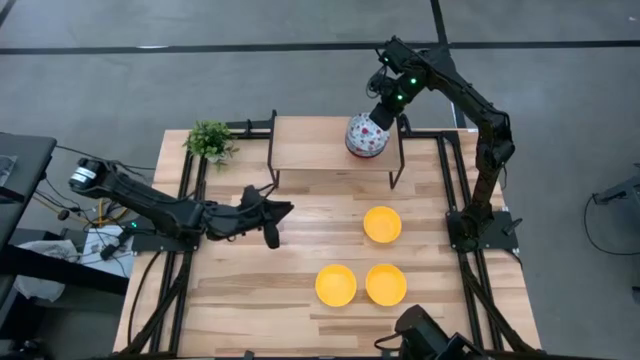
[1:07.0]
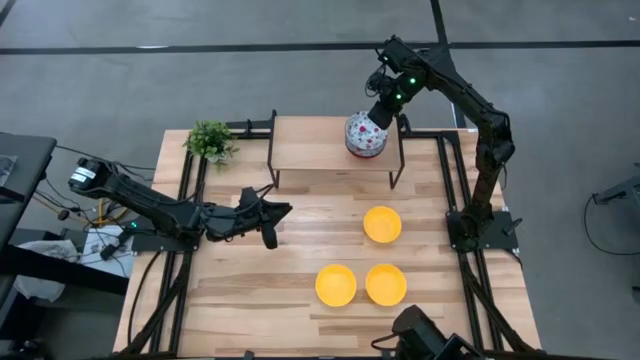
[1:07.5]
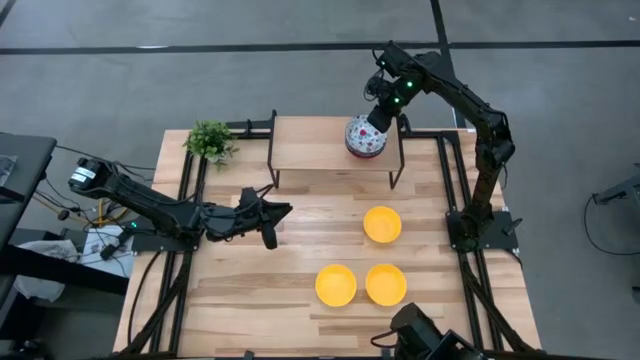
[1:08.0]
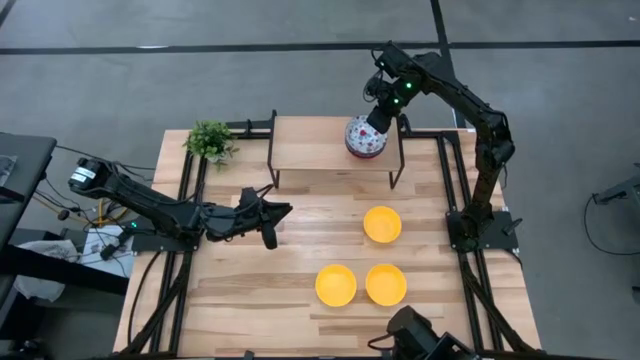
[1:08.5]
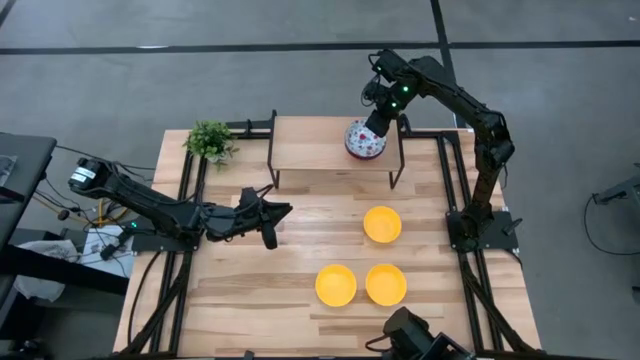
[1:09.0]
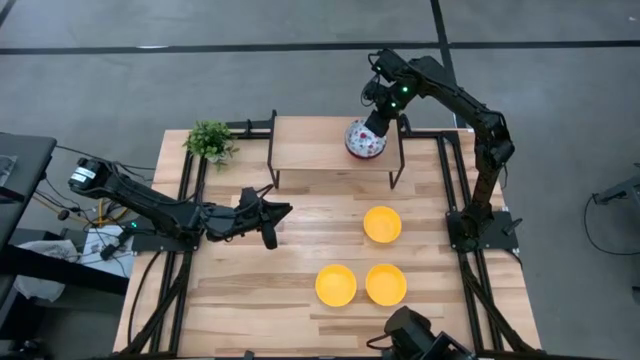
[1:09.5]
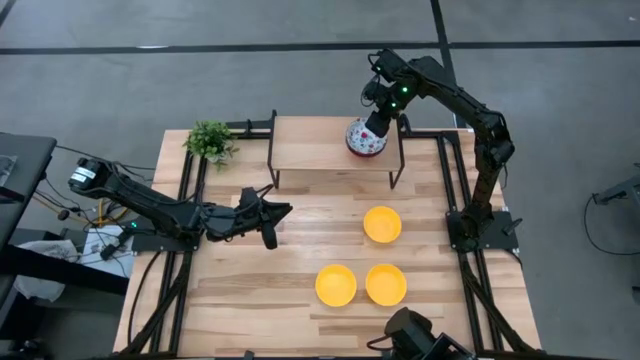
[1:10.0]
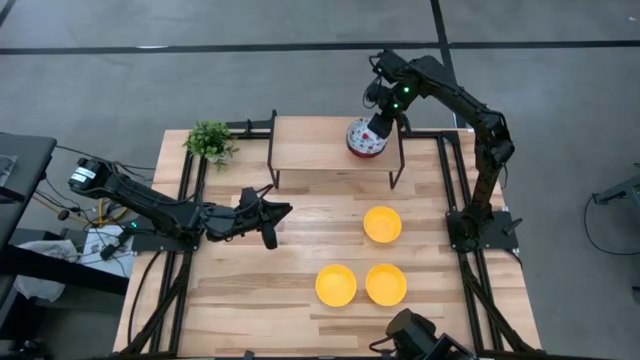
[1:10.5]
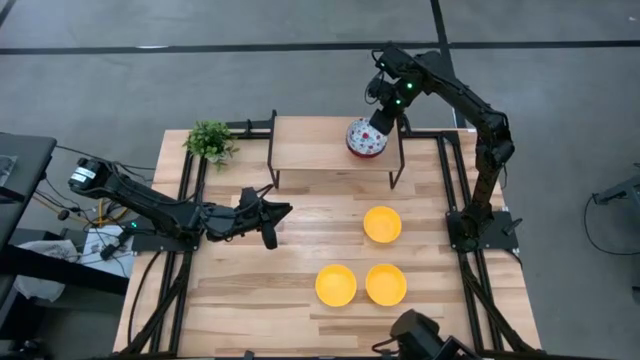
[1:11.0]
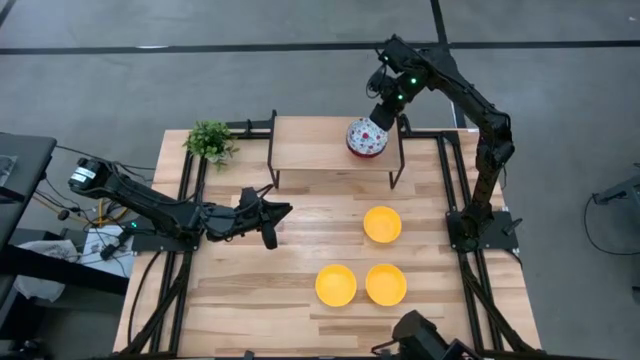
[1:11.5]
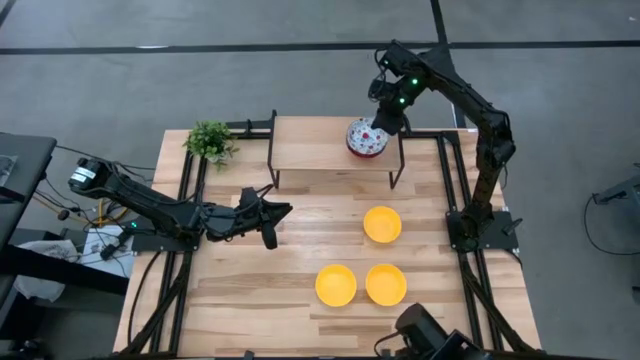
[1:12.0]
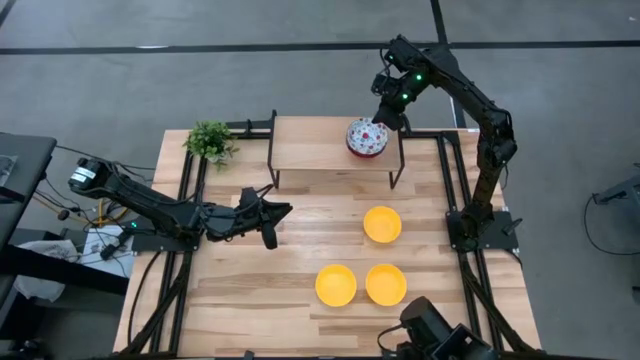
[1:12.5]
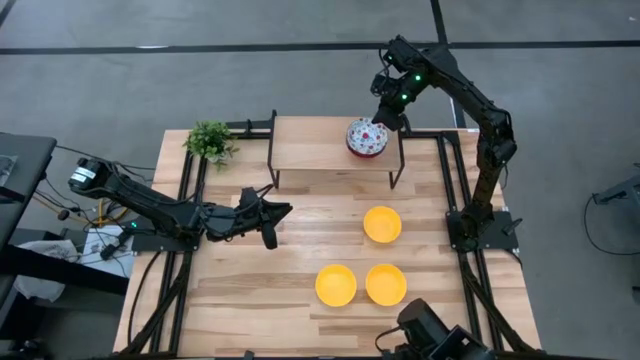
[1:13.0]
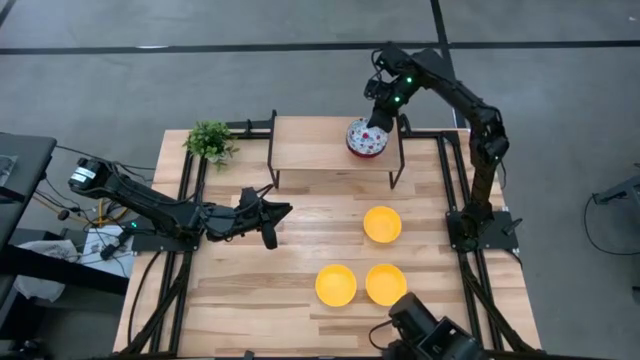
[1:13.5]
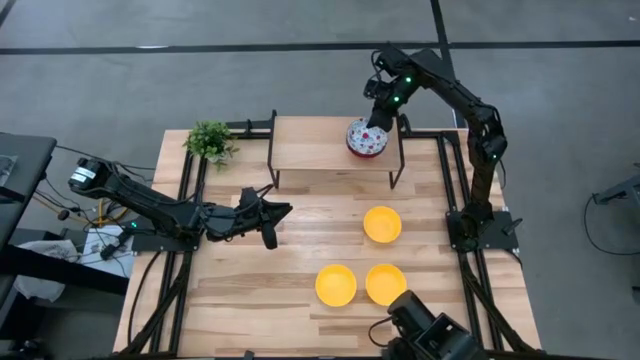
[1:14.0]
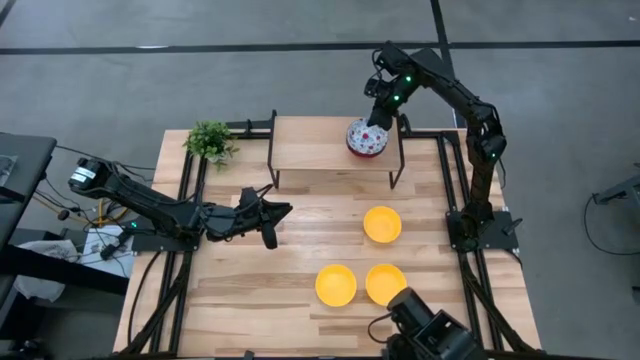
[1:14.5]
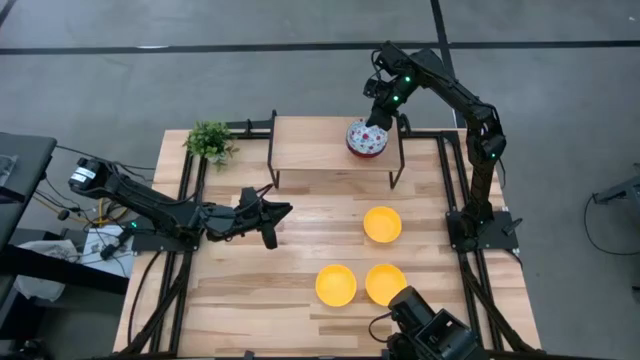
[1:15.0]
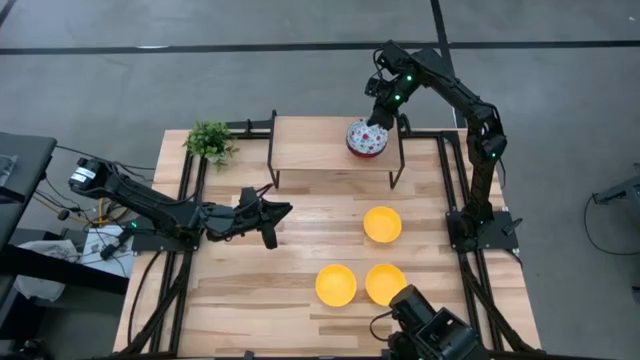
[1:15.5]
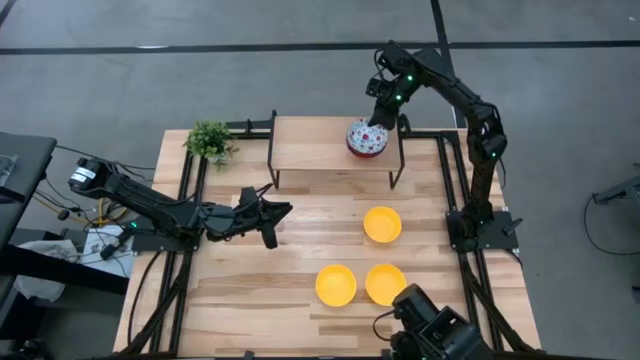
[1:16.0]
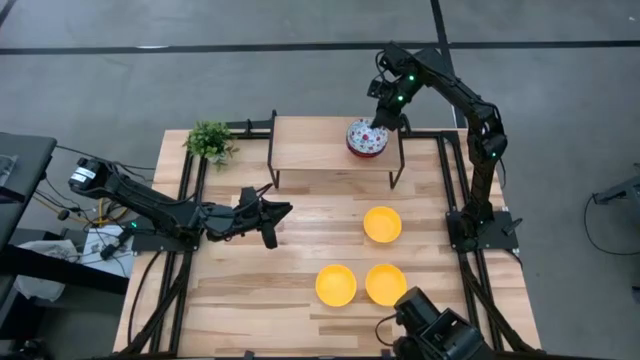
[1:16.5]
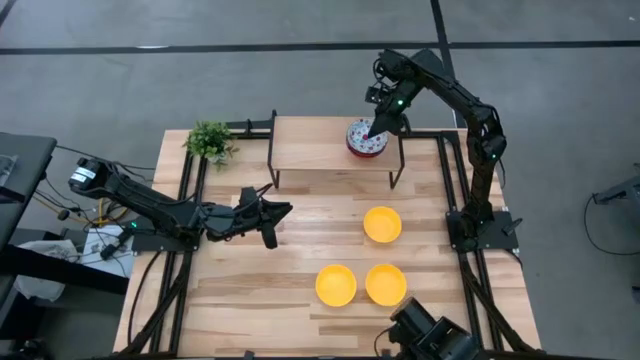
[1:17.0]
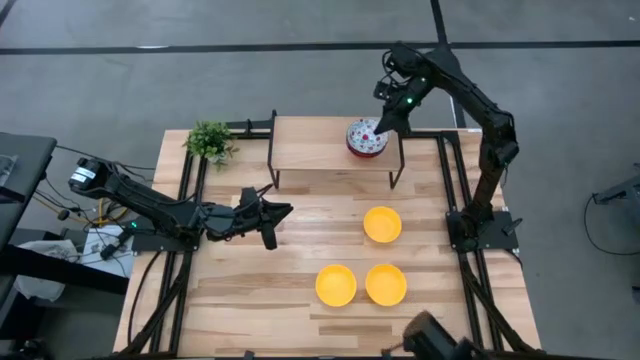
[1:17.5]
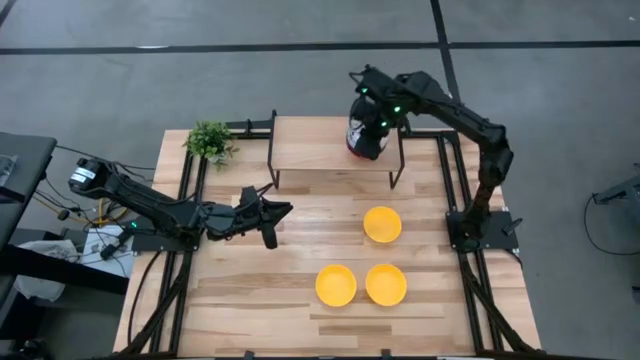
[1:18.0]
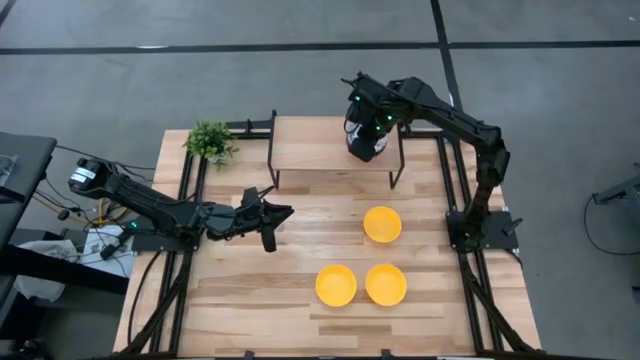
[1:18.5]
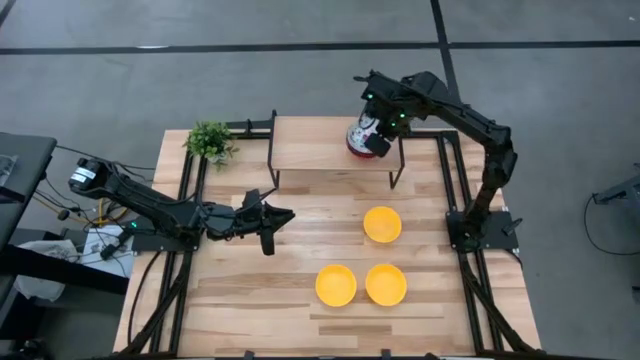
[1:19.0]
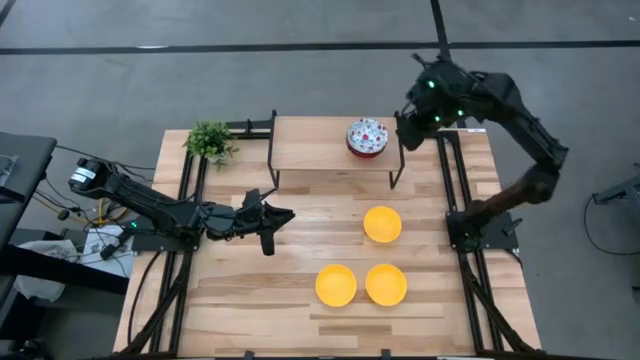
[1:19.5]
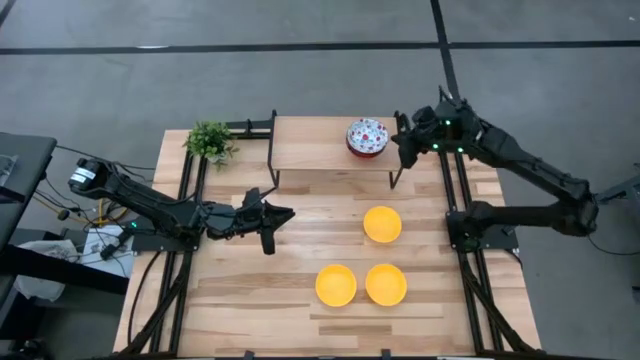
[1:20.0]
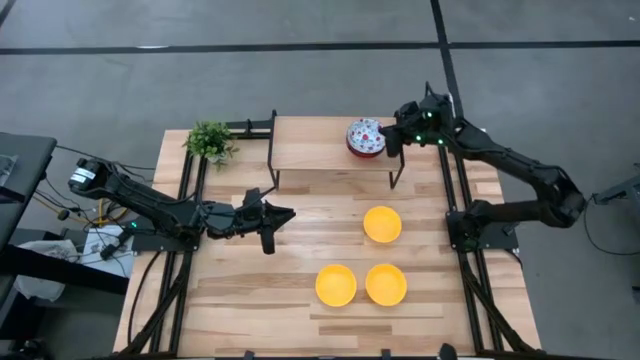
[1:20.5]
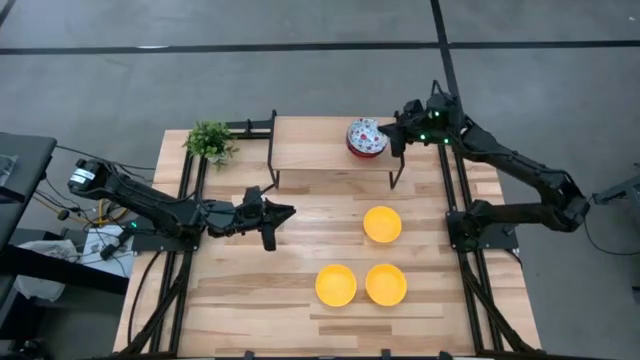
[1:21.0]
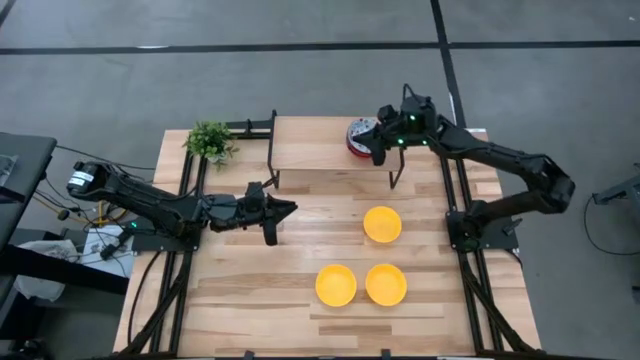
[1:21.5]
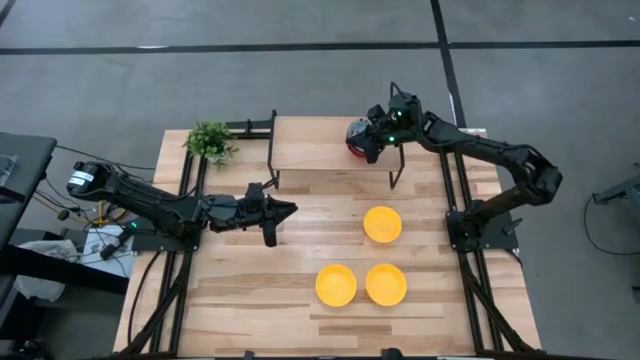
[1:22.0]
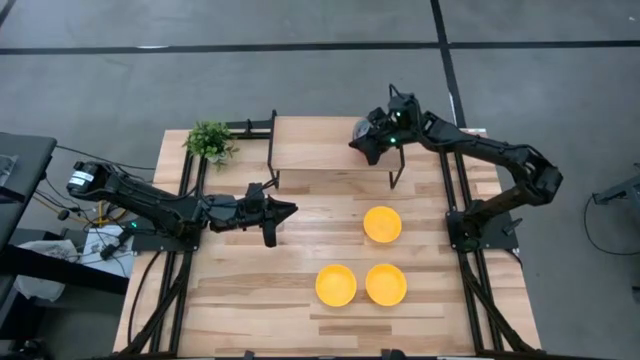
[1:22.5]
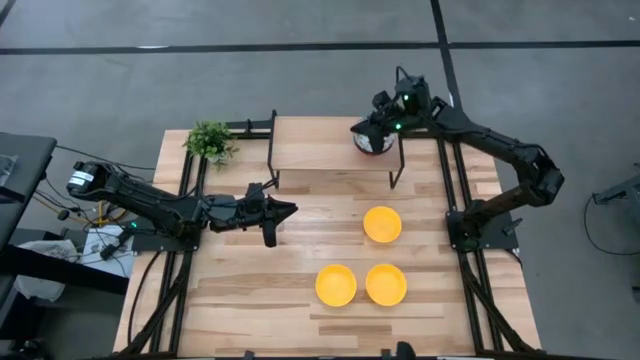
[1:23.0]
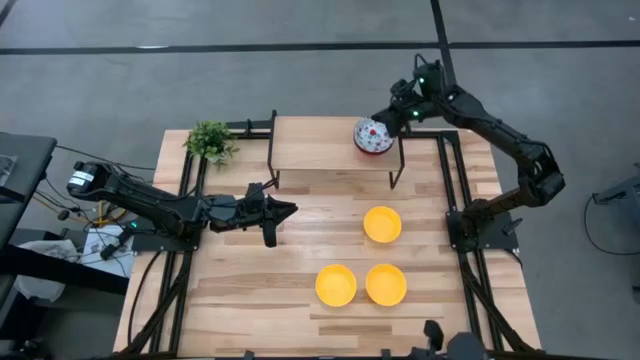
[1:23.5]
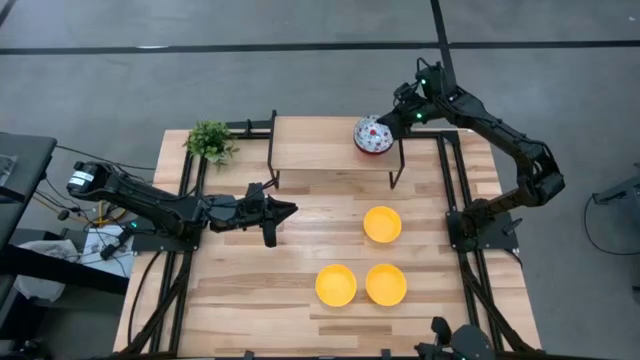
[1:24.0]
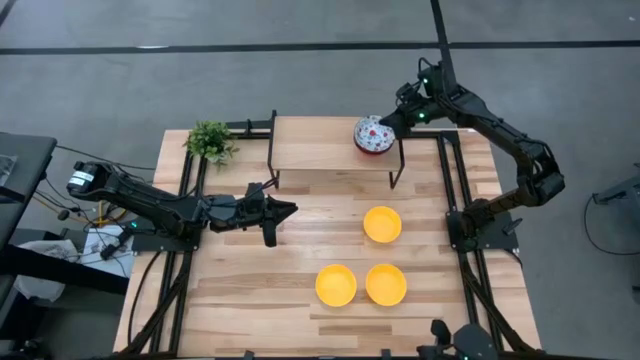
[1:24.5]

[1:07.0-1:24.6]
Task: Pick & Place Mini bowls
Stack the white bowl on top of the white bowls on the shelf

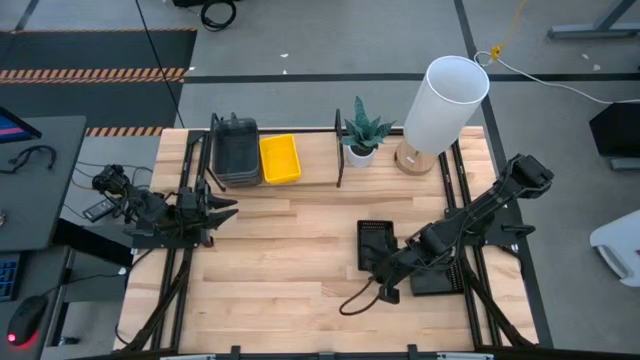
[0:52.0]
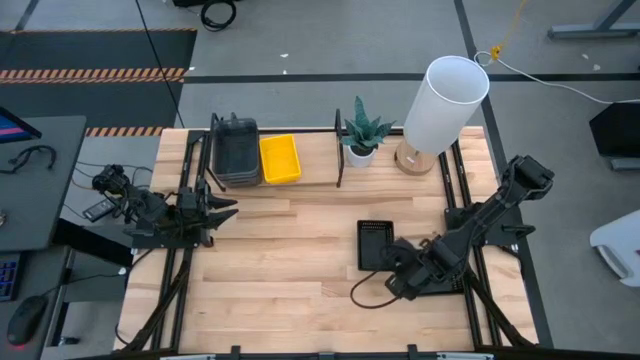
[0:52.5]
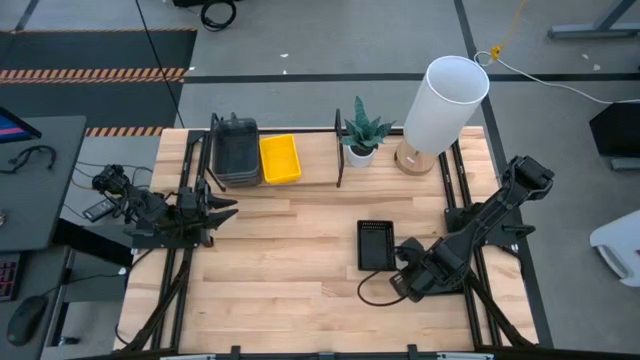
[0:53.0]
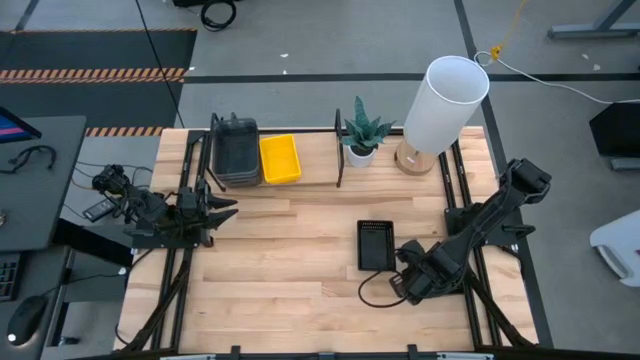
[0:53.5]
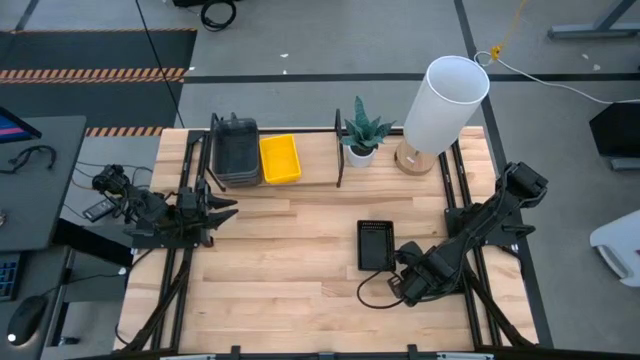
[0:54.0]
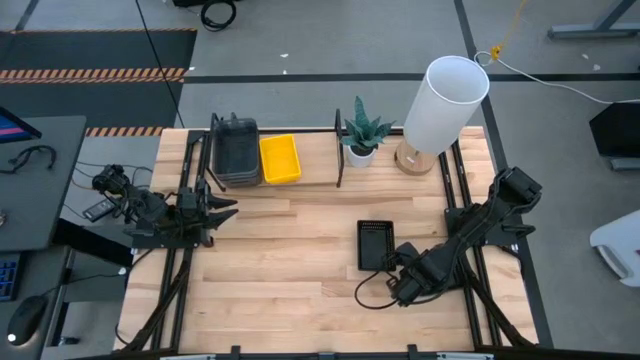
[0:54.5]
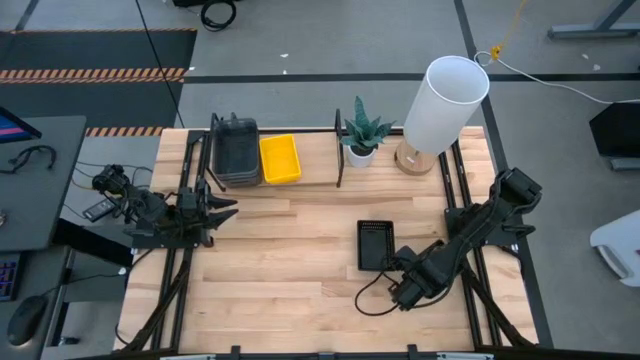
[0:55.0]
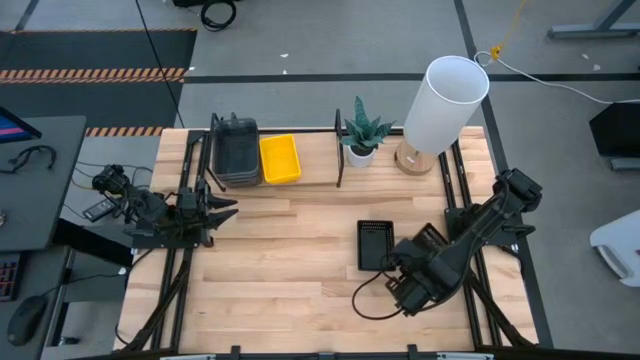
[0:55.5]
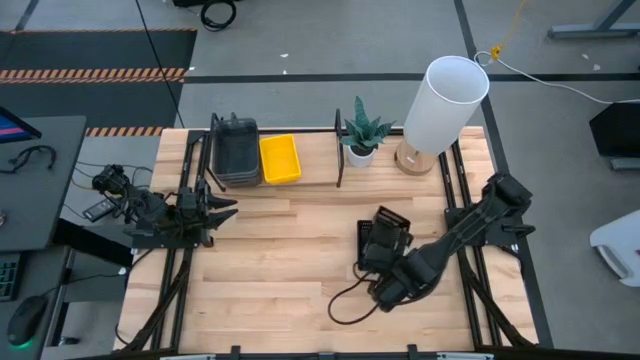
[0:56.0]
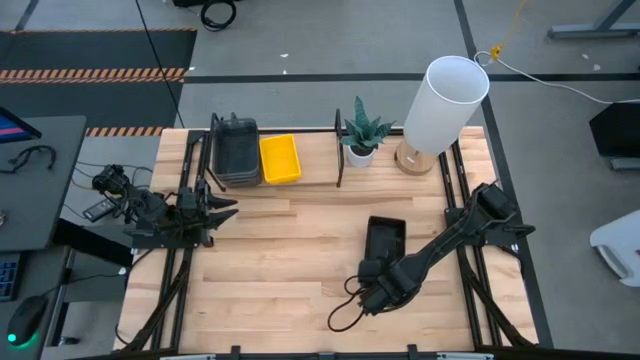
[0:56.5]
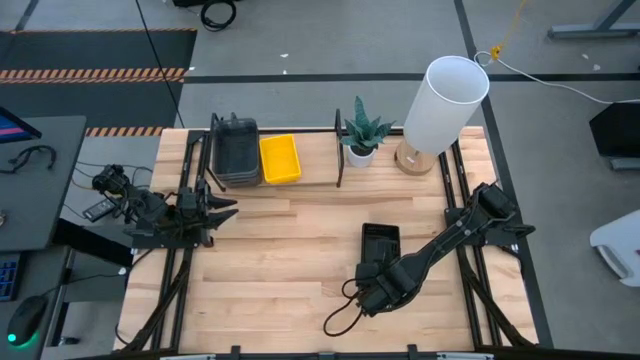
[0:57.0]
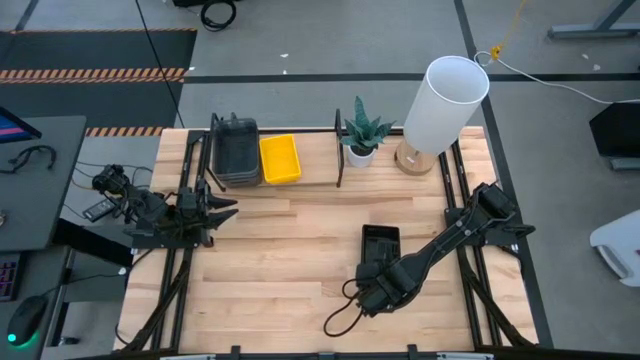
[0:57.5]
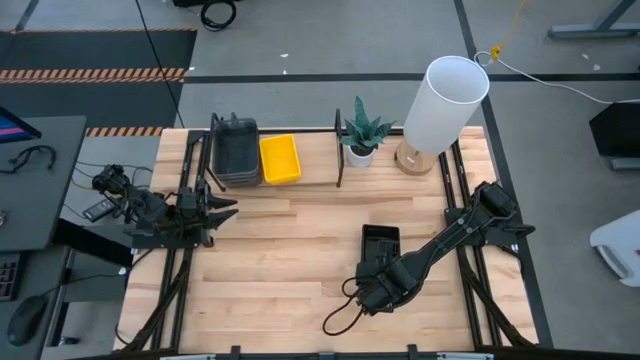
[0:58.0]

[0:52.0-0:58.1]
Task: Stack baskets on shelf by color
Stack the bottom black bin on the top black bin
